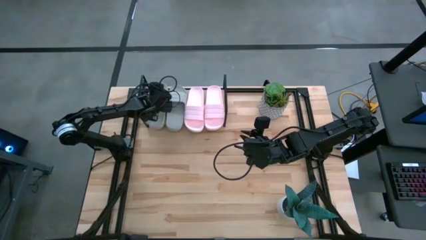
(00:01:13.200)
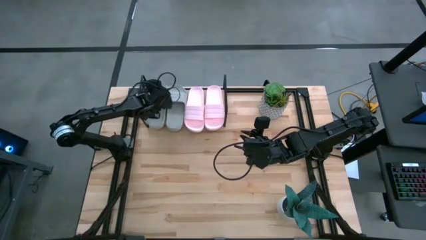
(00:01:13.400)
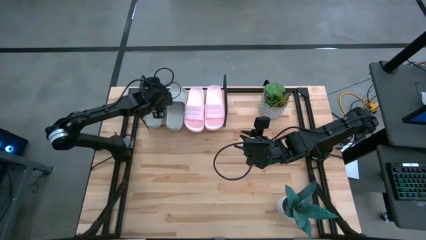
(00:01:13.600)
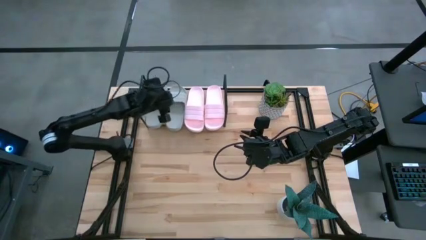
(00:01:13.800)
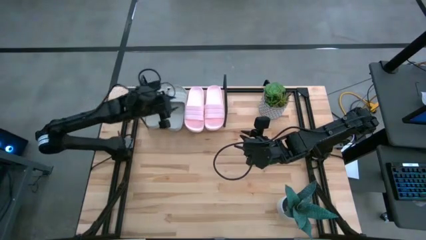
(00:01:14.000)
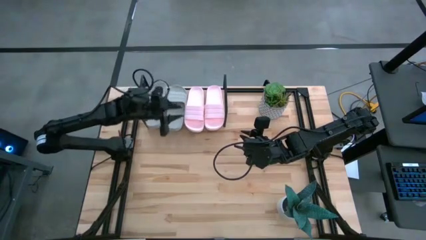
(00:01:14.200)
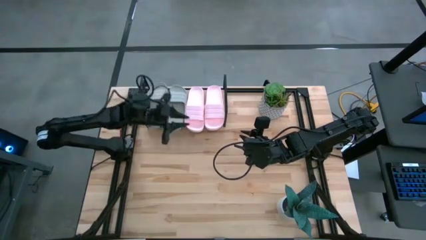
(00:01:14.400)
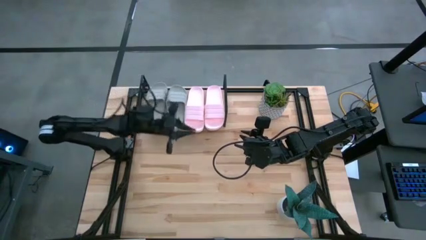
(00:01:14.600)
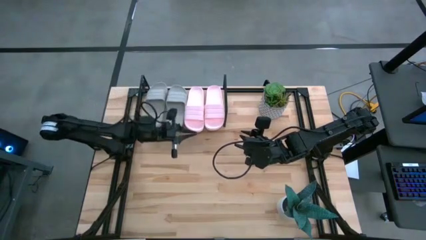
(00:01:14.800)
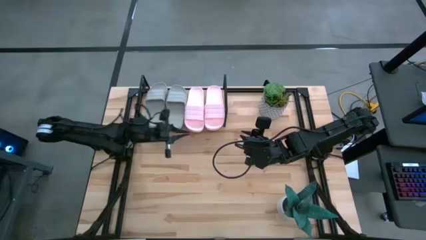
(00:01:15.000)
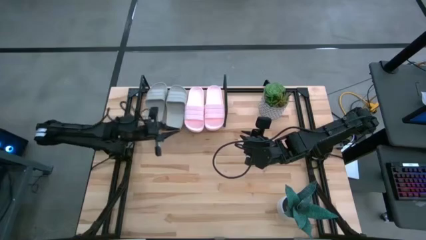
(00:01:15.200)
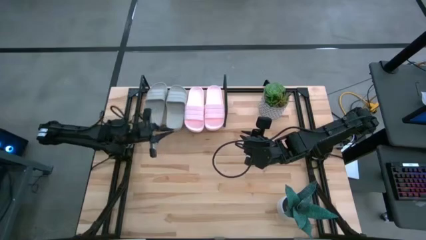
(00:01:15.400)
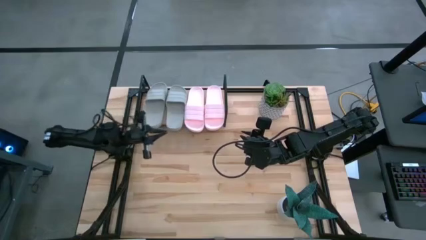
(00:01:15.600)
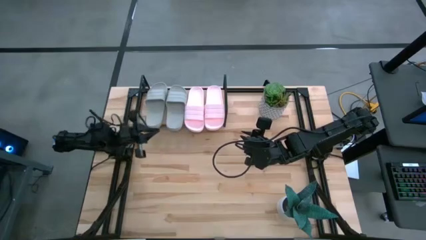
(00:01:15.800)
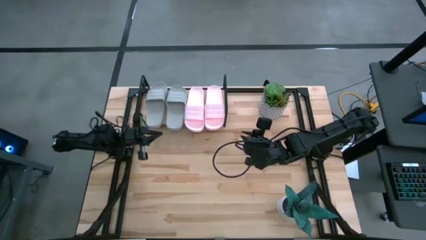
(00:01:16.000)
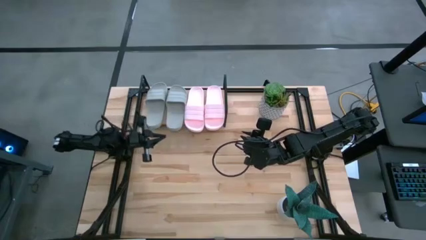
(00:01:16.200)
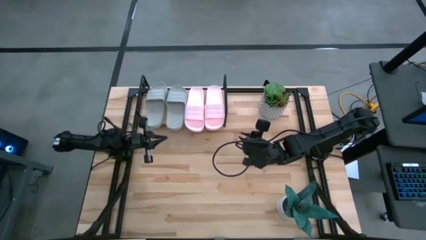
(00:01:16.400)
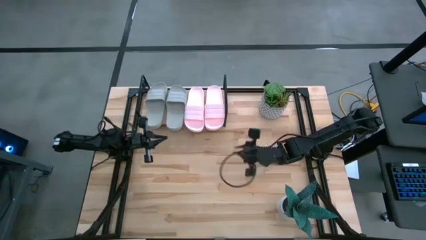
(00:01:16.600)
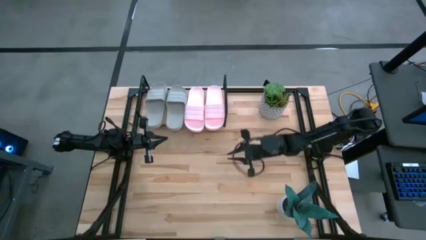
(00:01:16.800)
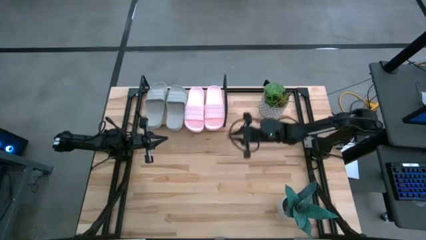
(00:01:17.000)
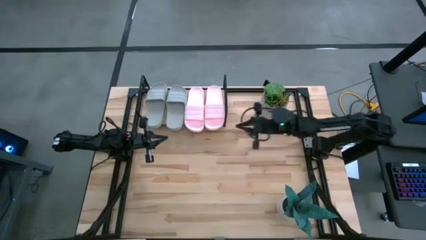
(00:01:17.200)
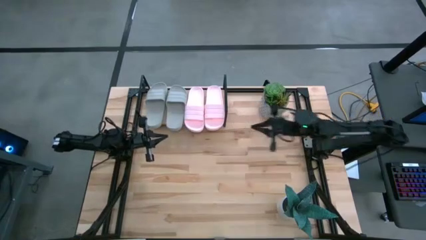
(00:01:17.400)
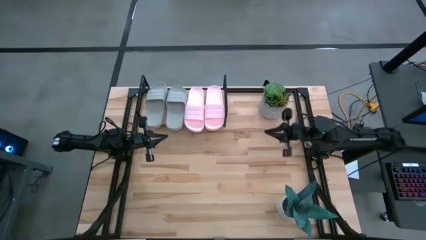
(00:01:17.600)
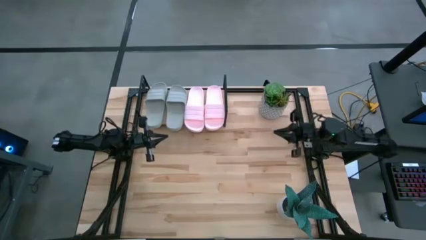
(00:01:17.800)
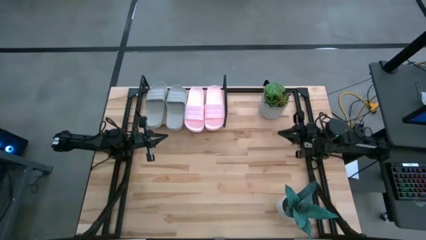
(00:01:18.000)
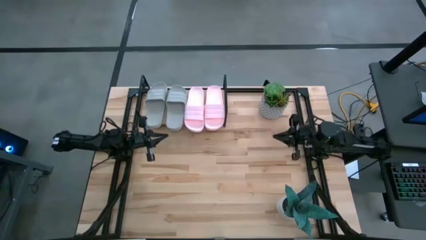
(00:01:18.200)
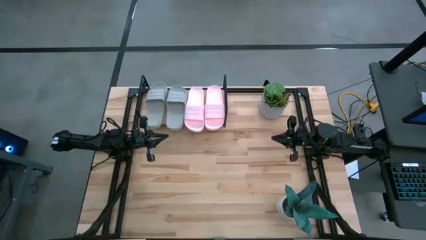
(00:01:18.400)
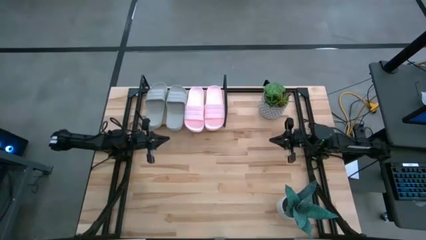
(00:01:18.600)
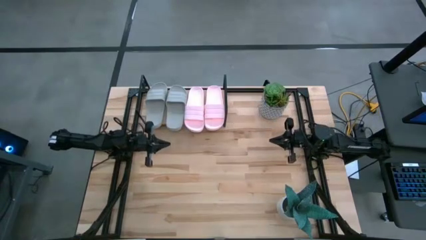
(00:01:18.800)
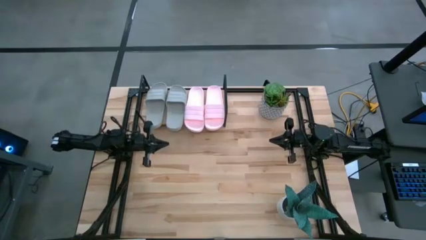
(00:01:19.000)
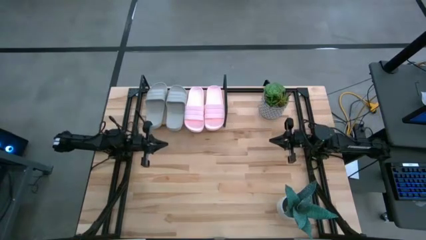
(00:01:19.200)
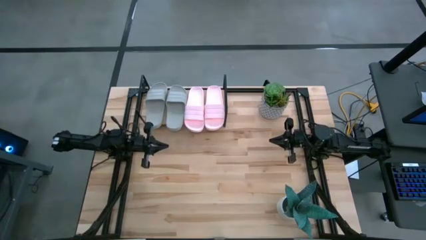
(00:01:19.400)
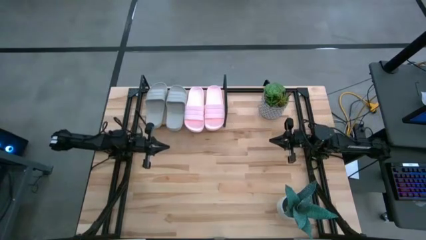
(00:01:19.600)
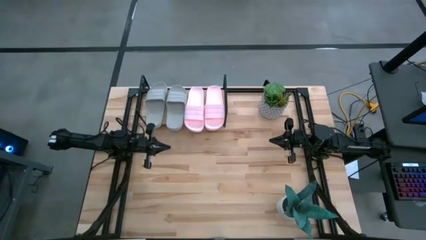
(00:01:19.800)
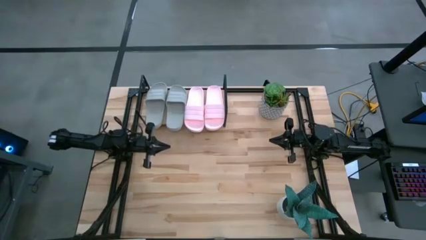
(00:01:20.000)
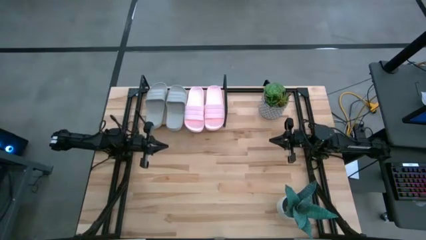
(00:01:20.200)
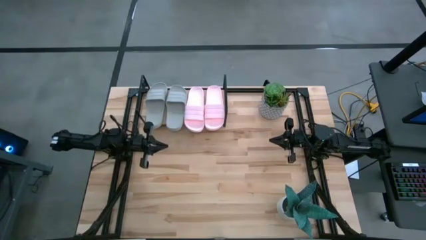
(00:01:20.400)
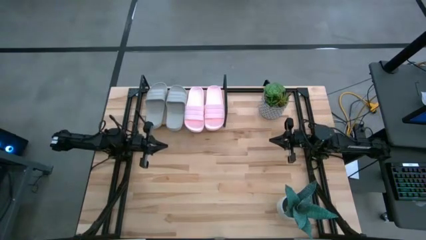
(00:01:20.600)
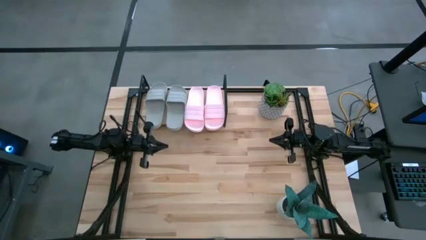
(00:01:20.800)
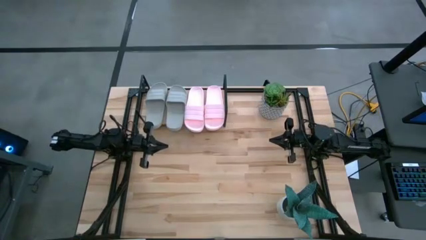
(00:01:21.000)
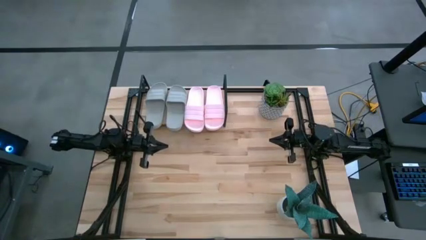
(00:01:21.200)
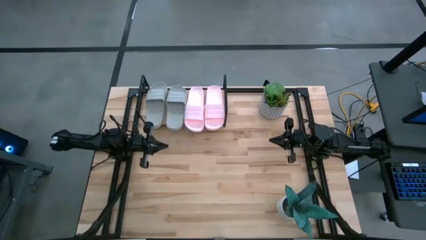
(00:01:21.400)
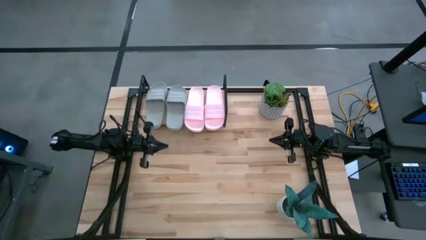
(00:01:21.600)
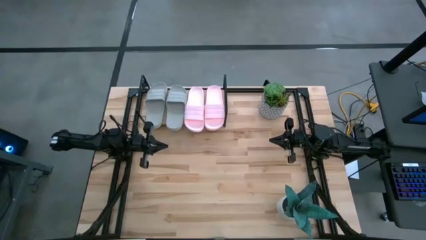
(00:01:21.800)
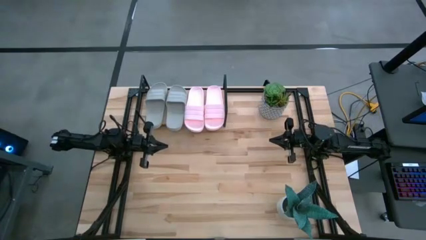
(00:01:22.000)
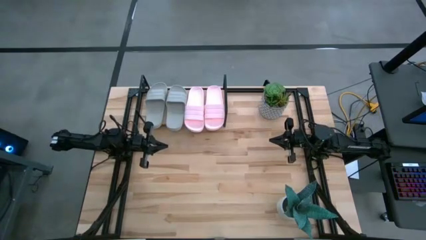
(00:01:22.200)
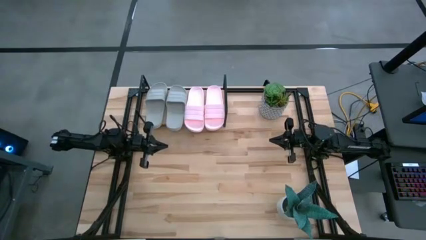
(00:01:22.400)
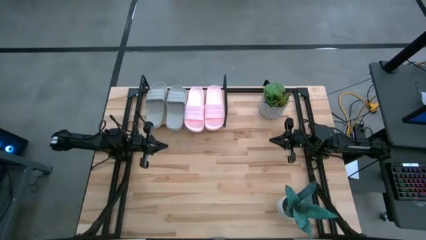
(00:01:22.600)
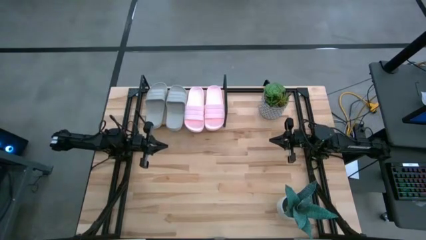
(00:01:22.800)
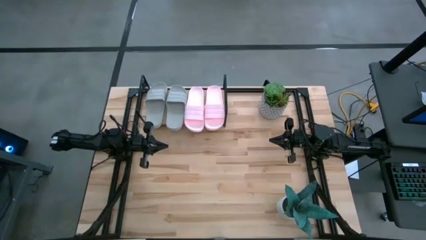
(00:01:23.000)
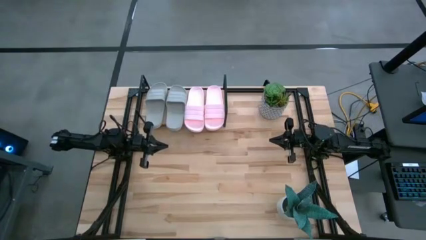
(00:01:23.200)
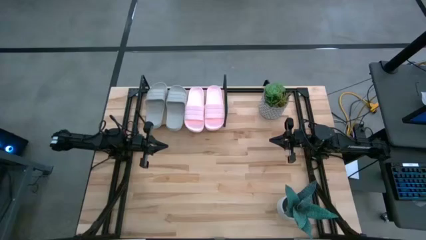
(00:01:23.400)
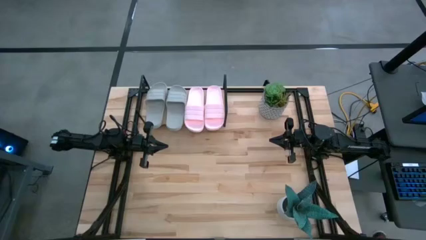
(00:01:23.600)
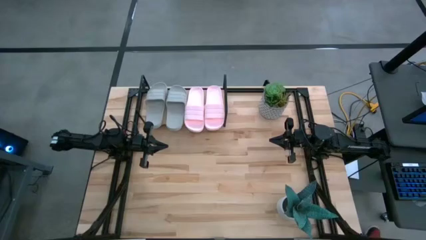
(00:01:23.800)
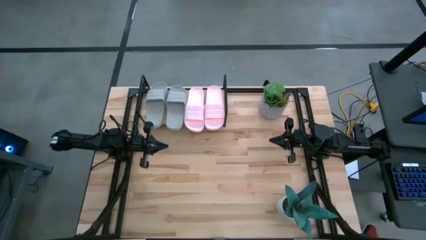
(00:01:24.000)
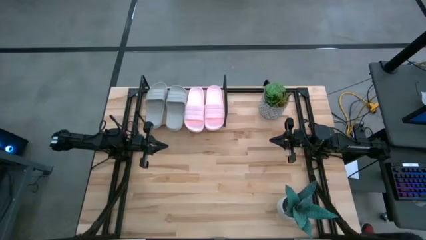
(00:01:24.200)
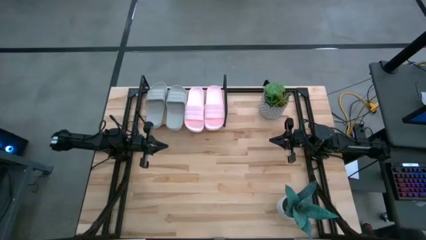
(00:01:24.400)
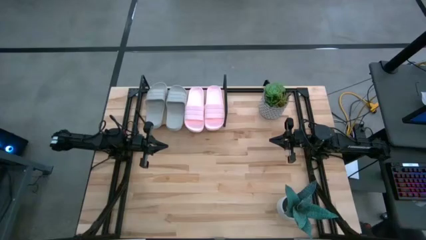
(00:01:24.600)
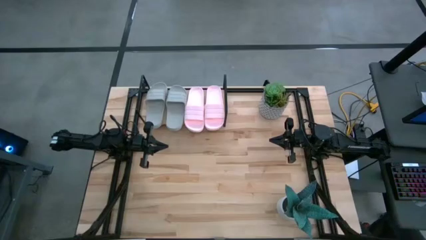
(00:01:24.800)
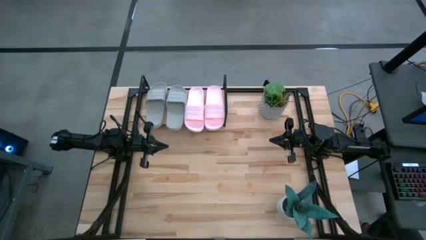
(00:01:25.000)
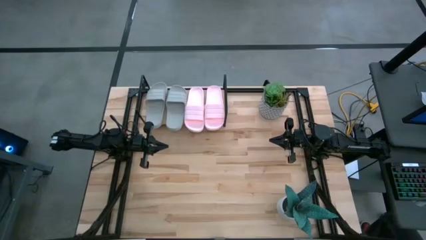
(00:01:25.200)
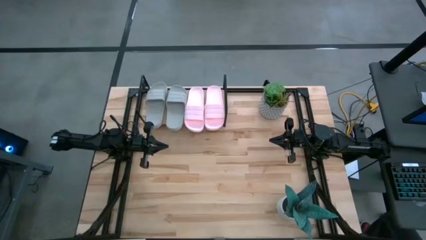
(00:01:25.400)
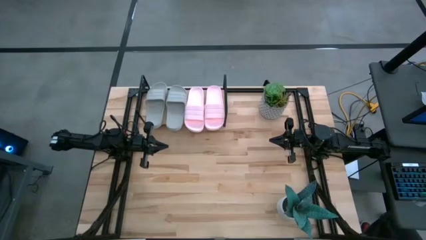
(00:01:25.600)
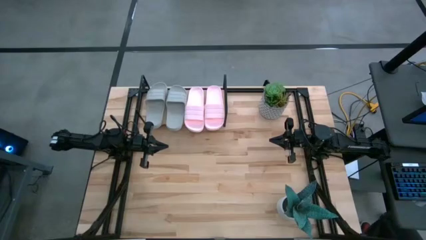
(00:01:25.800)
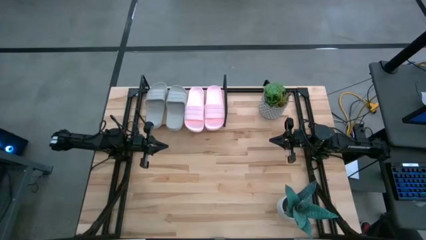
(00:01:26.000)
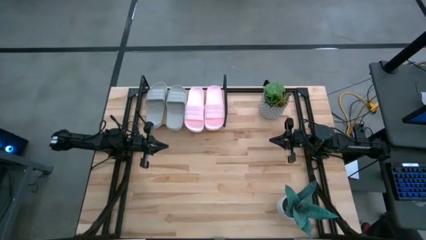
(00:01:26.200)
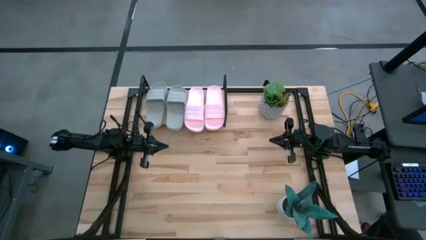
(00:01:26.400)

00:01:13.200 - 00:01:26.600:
Task: Pick and place slides into the shelf
Return to Home Position
